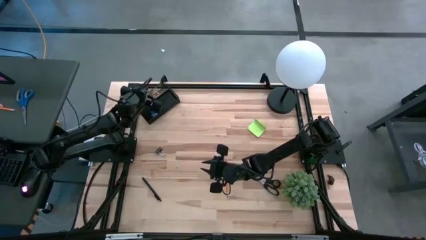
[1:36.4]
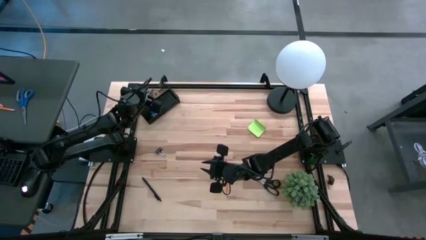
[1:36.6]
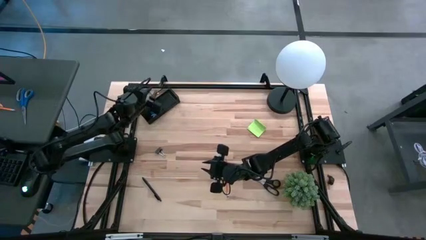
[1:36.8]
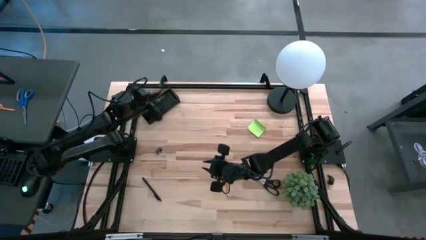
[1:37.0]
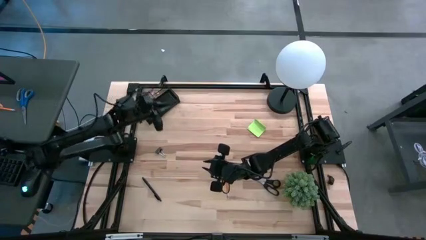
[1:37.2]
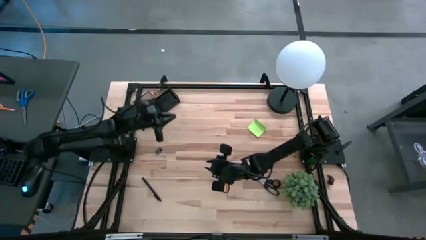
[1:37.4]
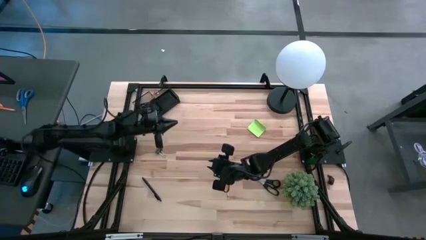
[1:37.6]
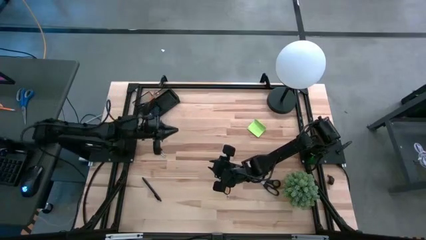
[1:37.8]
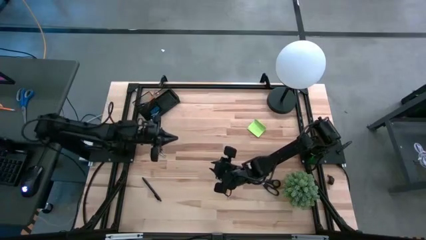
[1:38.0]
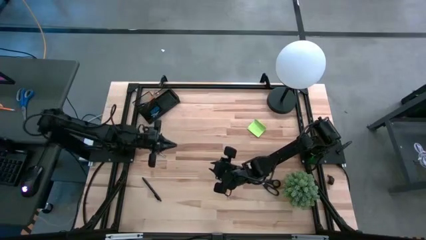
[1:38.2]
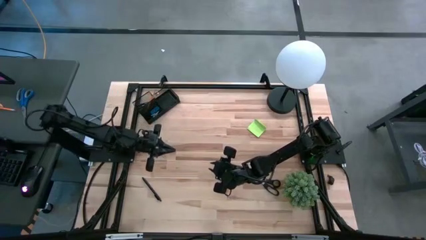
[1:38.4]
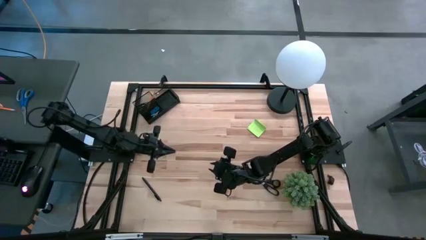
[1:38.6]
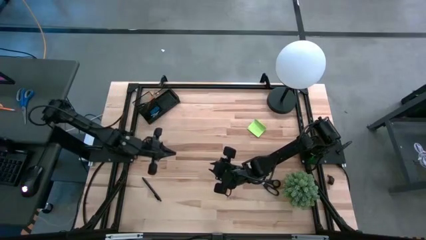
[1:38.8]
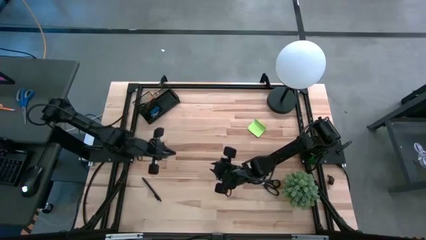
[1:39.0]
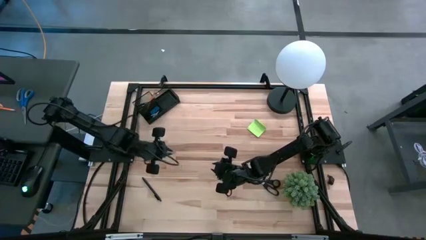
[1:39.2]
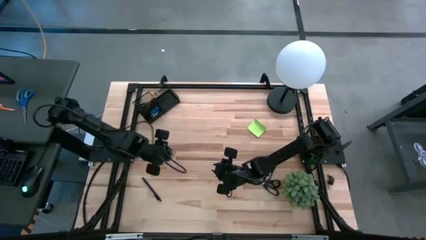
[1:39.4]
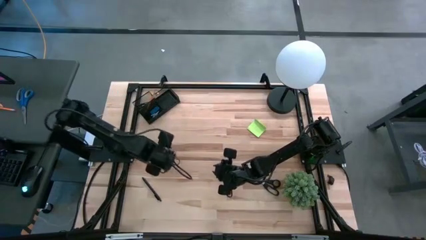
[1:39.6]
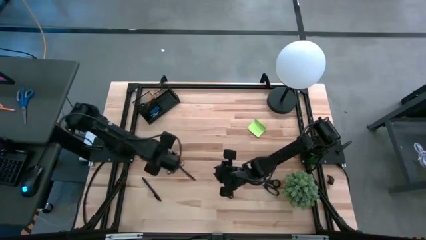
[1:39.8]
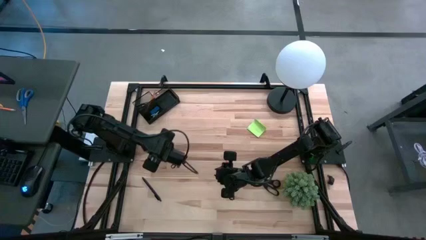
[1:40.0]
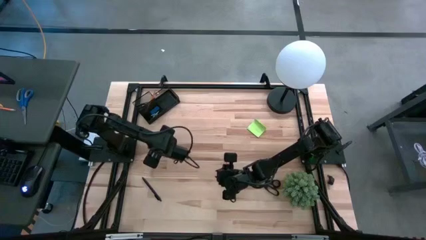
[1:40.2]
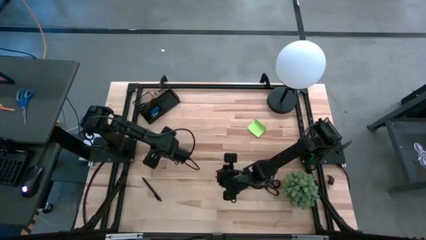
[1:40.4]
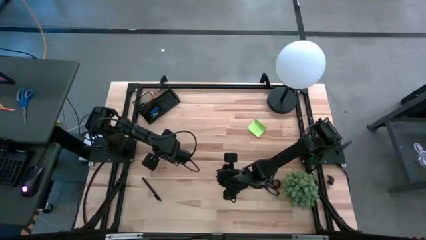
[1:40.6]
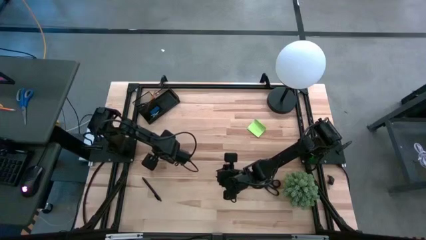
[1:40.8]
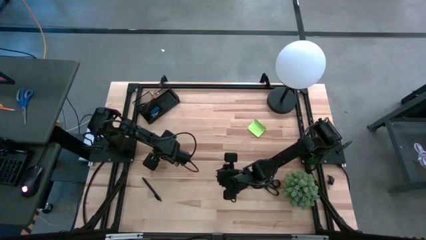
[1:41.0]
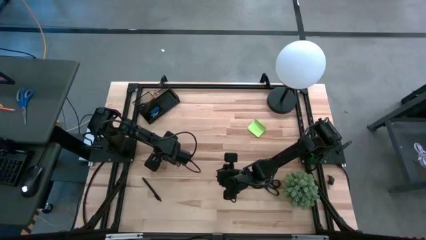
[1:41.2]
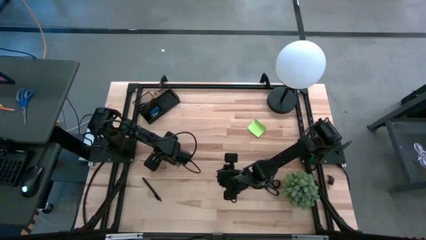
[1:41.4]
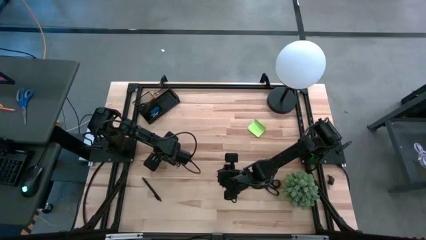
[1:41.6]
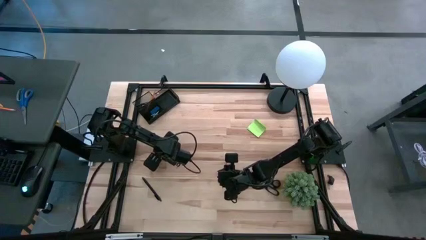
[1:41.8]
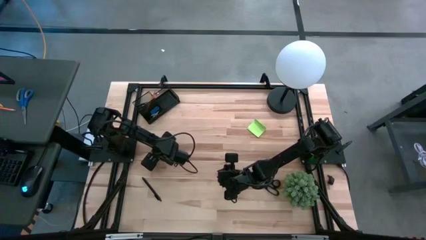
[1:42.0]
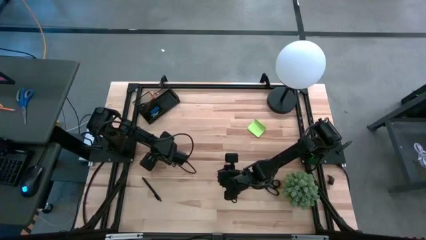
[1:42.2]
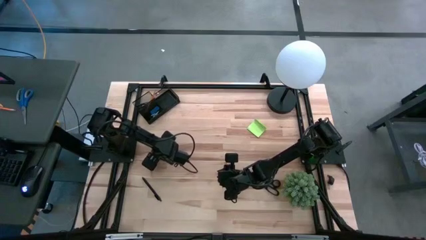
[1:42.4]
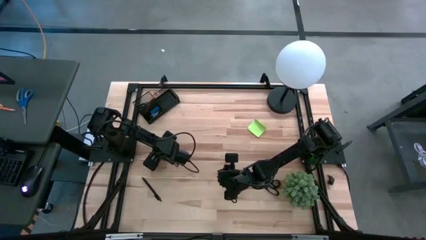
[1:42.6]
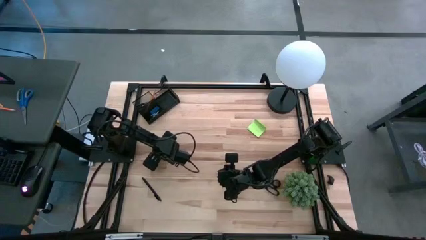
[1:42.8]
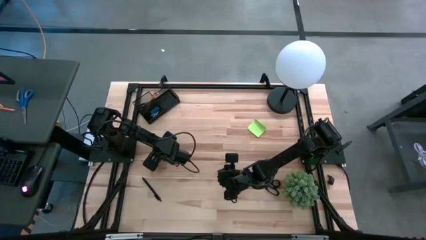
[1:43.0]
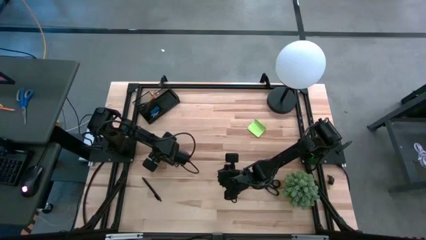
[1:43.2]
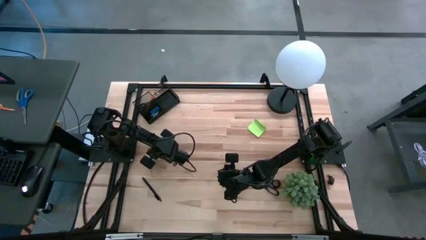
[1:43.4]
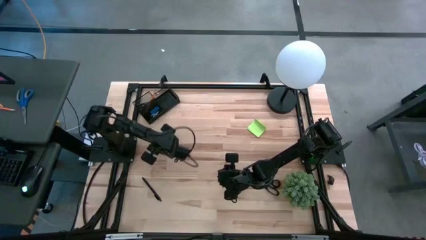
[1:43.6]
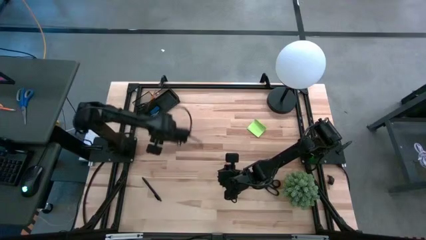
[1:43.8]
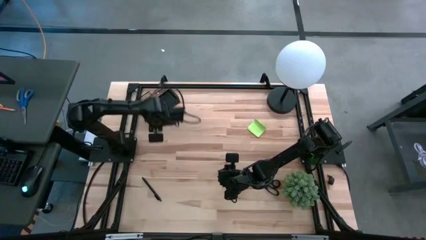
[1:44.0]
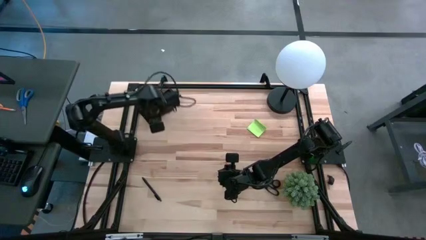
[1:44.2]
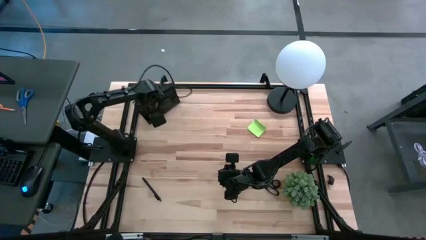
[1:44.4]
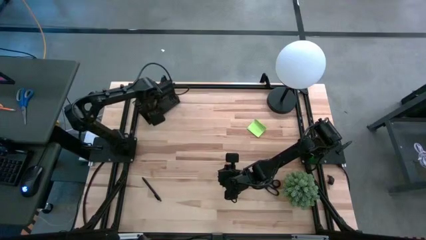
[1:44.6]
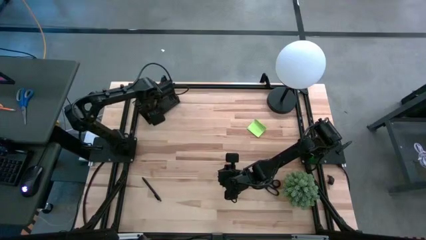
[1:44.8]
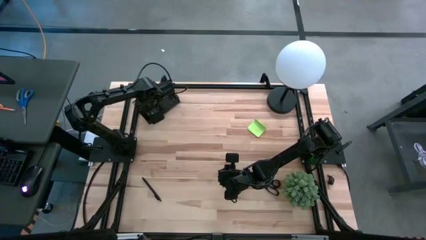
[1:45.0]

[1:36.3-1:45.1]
Task: Pick and place office supplies into organizer
Put the black binder clip into the bottom left section of the desk organizer
